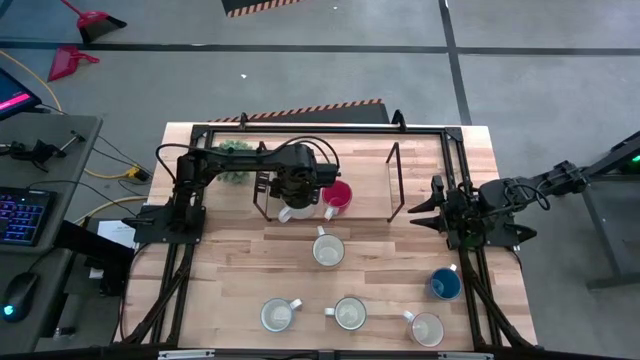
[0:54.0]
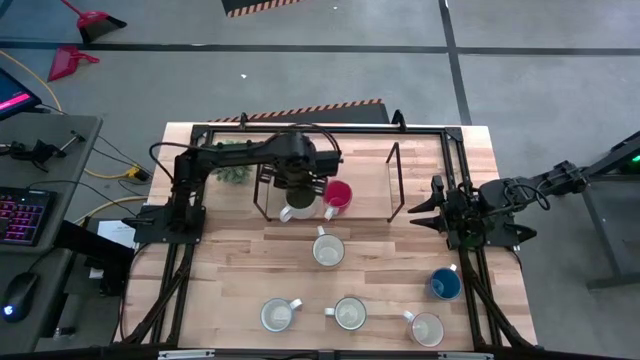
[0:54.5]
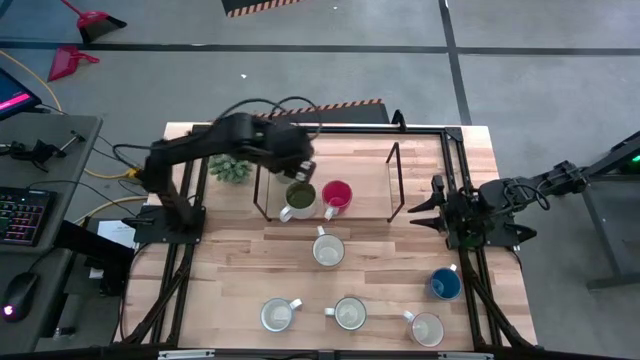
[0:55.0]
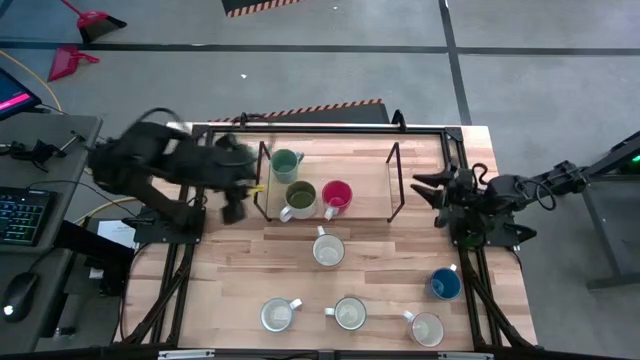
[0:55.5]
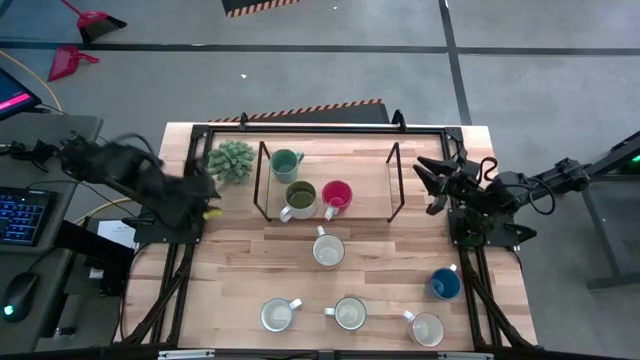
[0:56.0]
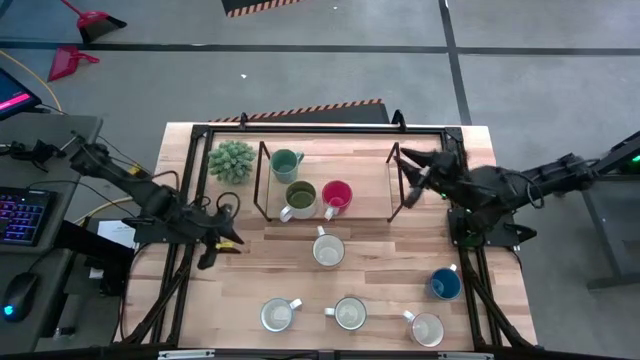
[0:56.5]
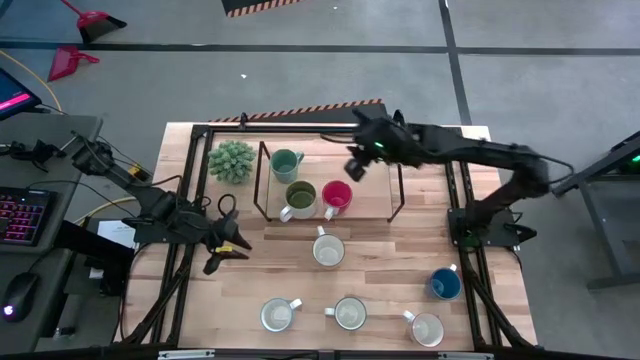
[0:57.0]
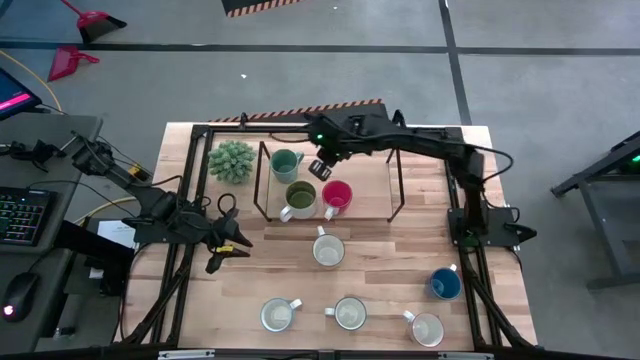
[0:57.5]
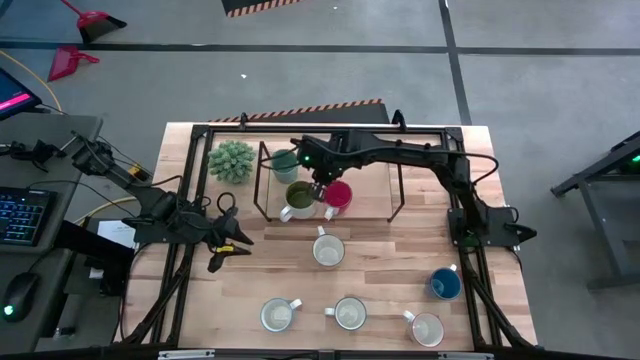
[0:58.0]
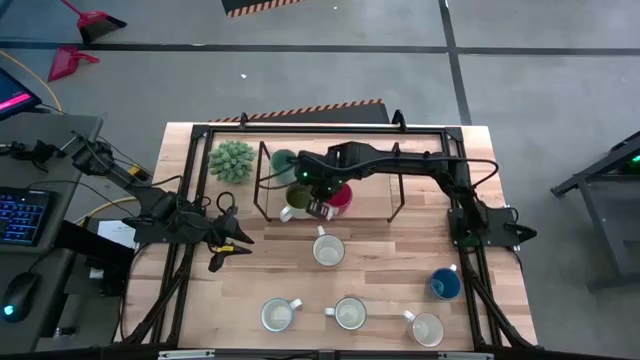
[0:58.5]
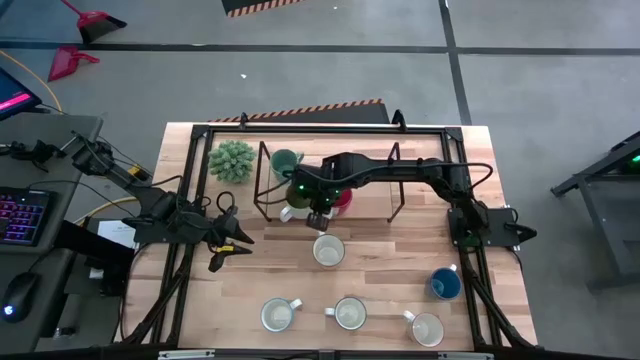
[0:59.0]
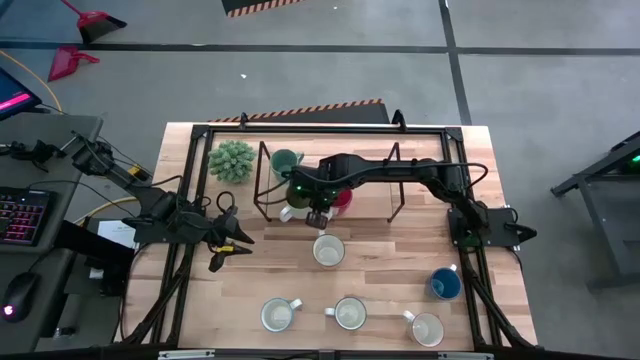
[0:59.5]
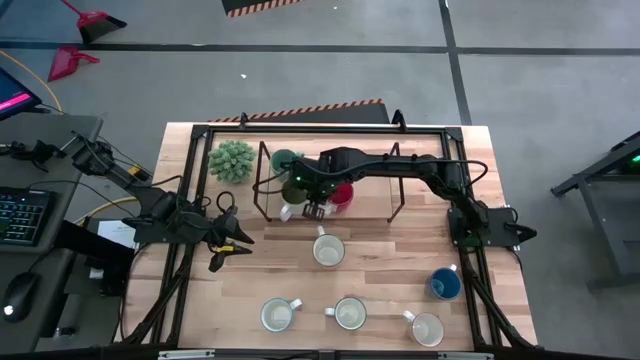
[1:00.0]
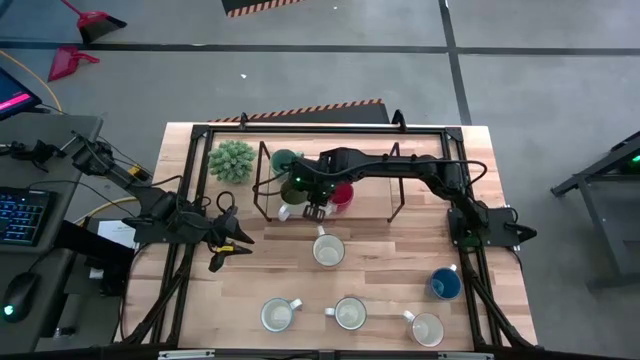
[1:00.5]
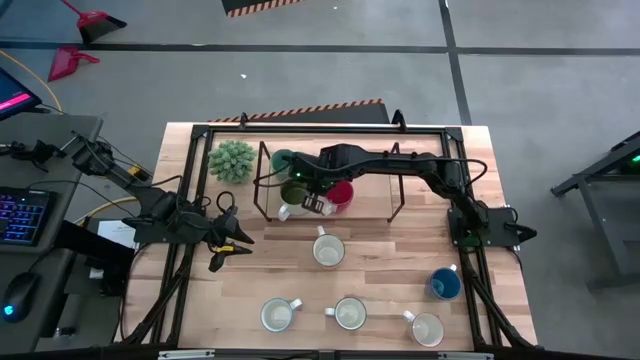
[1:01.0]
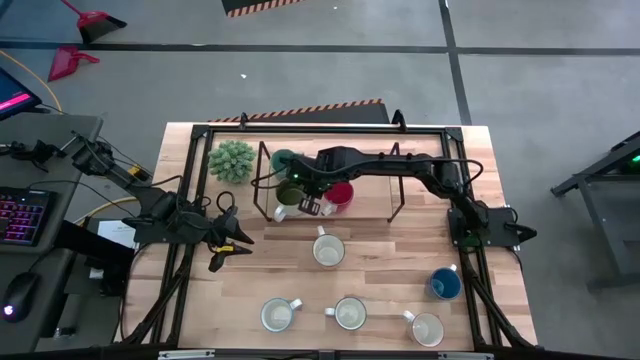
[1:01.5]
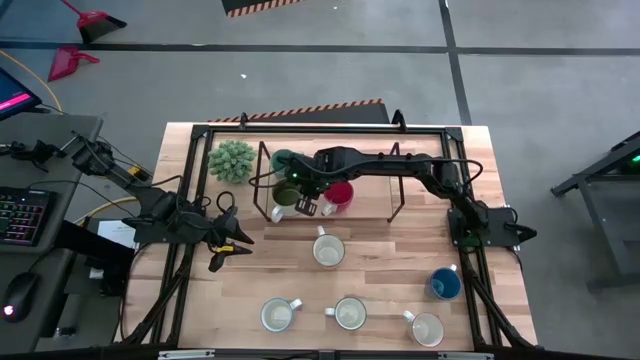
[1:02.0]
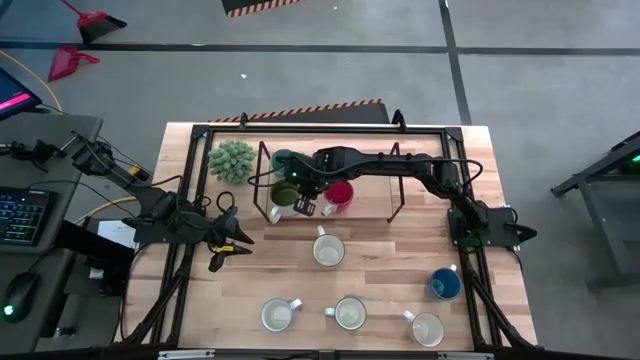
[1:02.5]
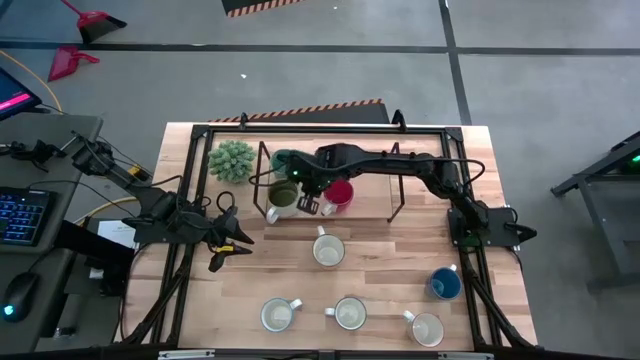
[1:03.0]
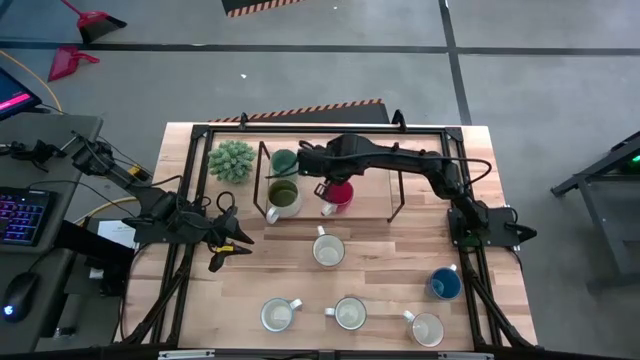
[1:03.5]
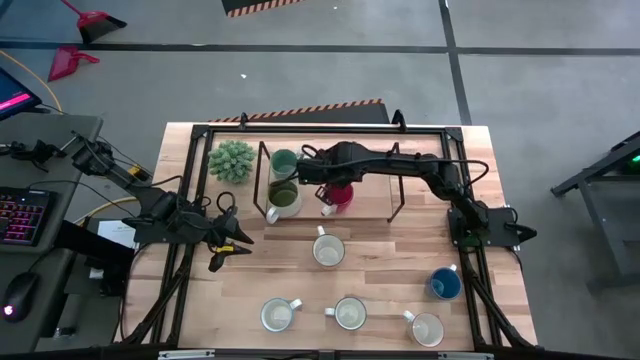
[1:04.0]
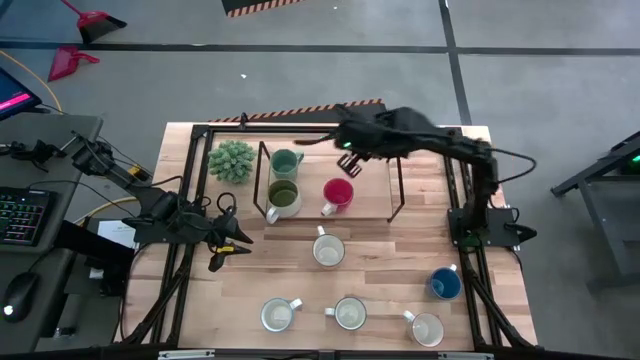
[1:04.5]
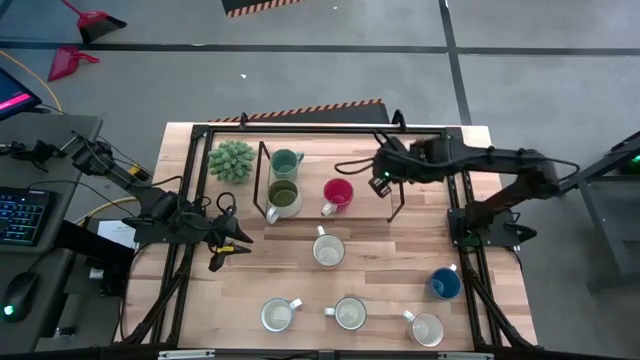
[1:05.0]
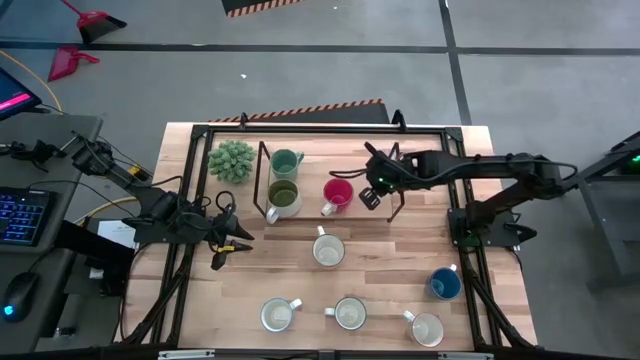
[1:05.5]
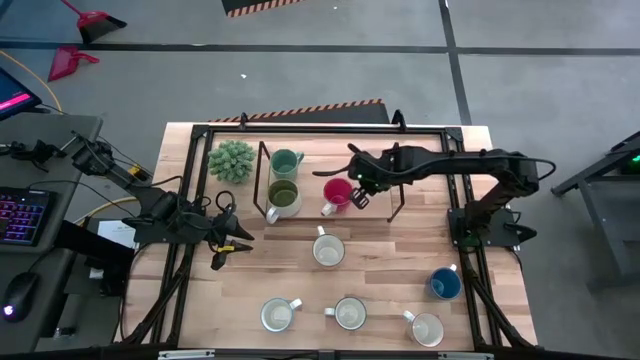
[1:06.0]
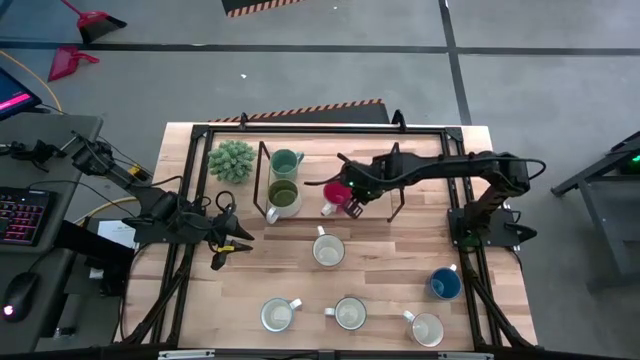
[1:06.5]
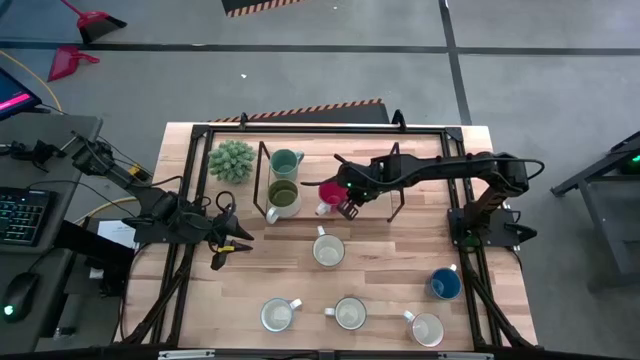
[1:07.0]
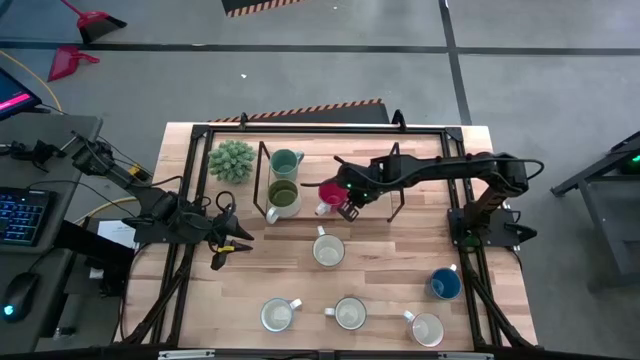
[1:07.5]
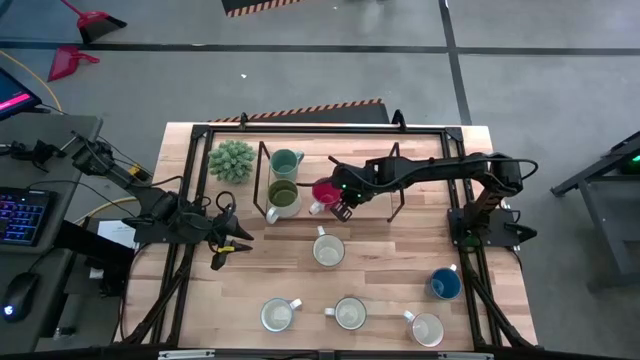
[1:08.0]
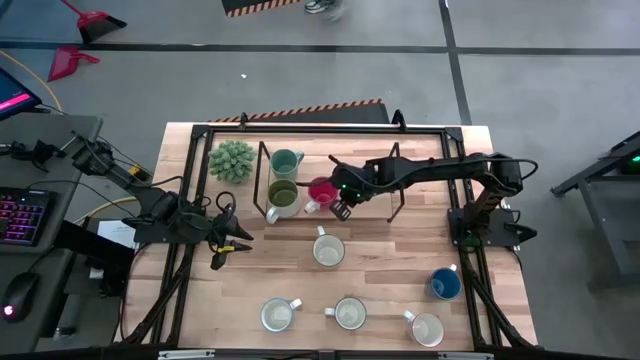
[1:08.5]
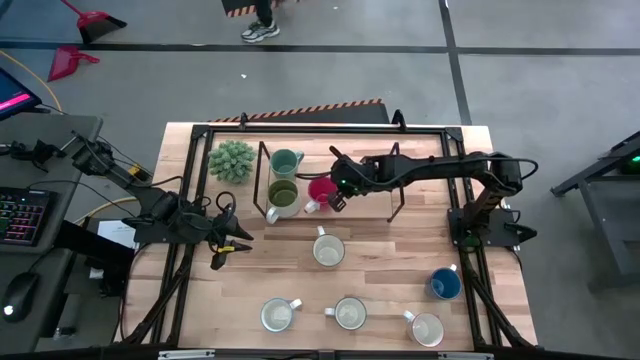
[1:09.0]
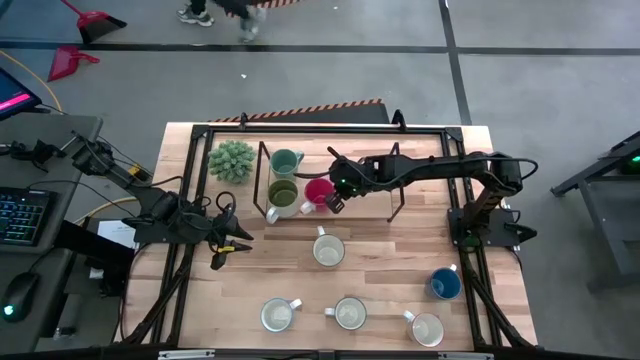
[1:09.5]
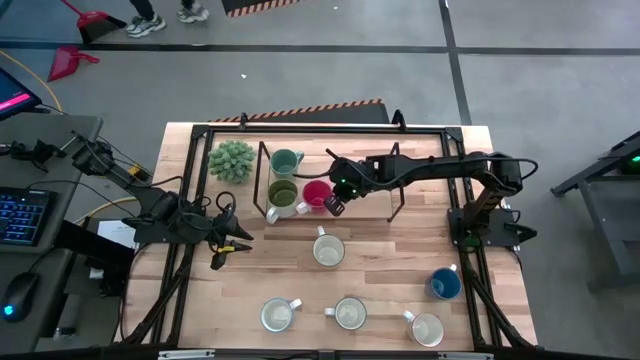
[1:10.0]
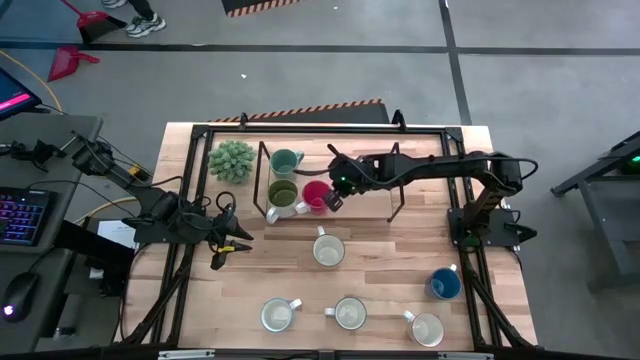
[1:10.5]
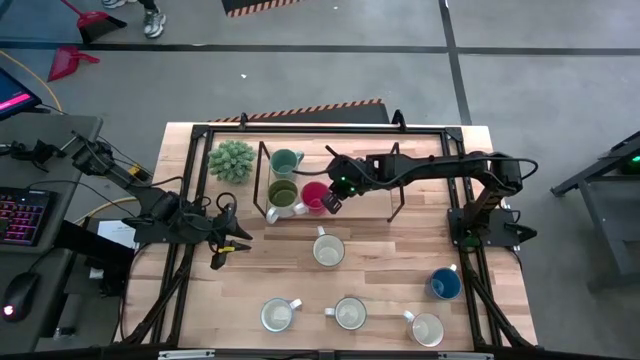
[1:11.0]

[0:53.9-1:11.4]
Task: Place coffee mugs
Adjust the mugs on the shelf
